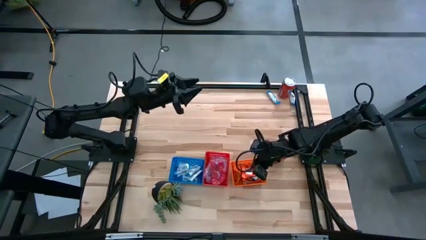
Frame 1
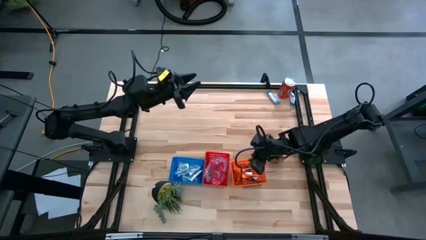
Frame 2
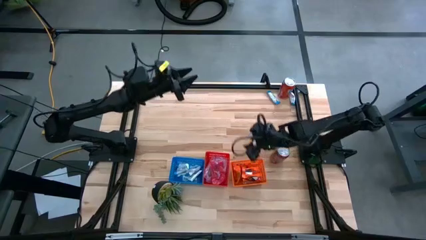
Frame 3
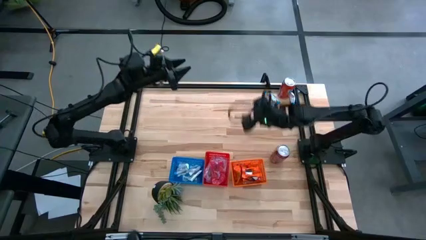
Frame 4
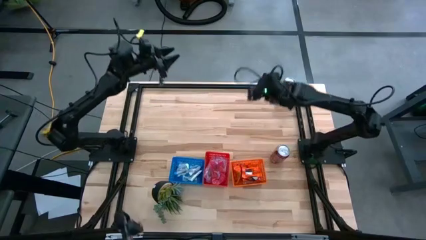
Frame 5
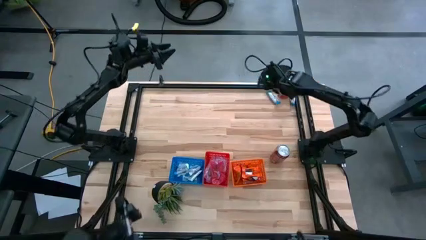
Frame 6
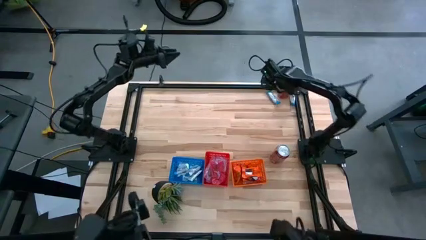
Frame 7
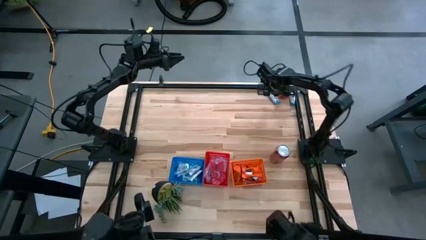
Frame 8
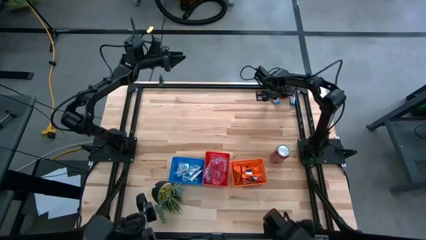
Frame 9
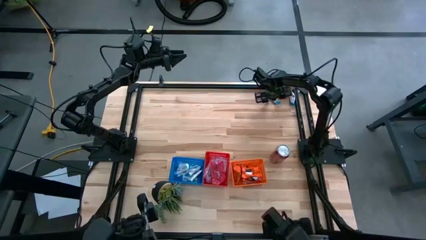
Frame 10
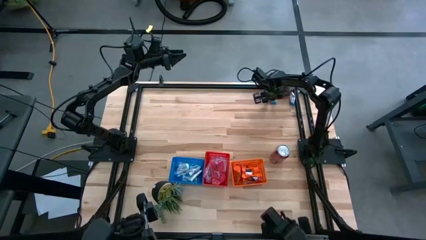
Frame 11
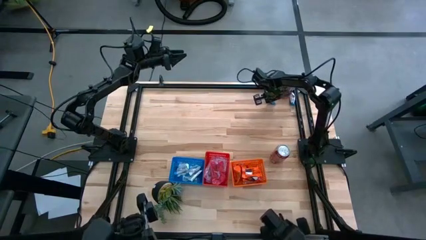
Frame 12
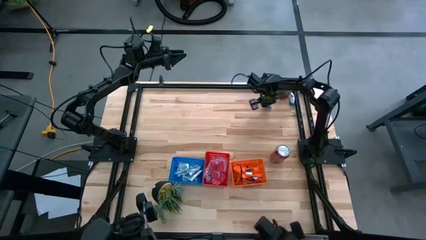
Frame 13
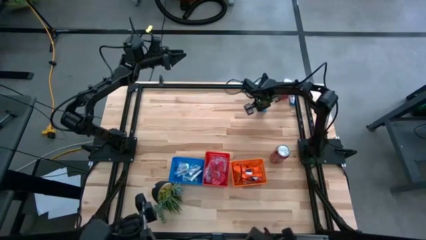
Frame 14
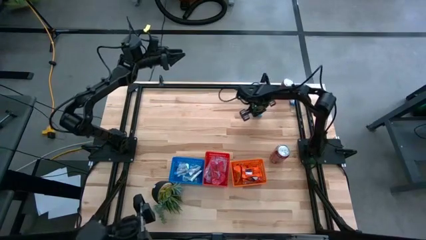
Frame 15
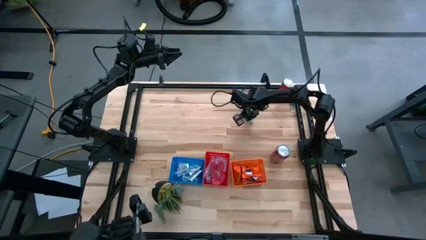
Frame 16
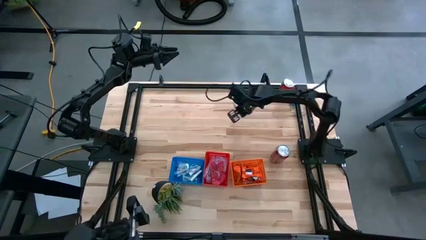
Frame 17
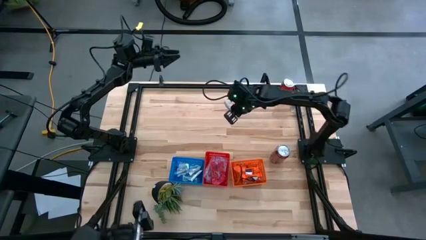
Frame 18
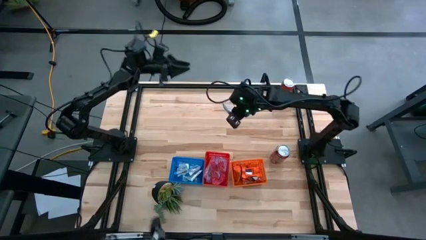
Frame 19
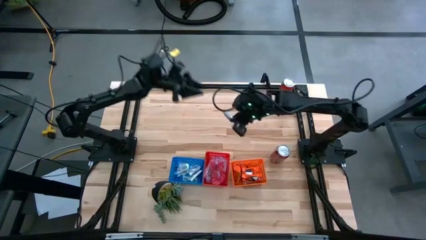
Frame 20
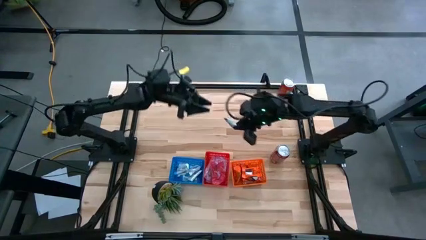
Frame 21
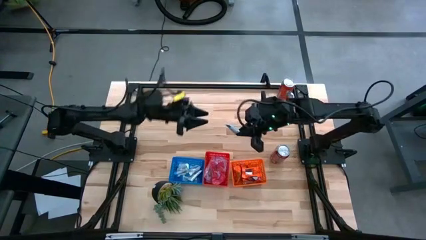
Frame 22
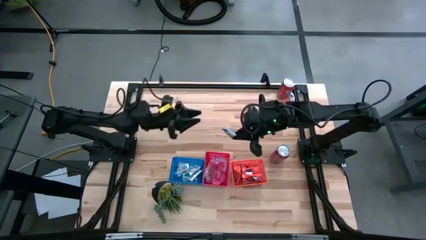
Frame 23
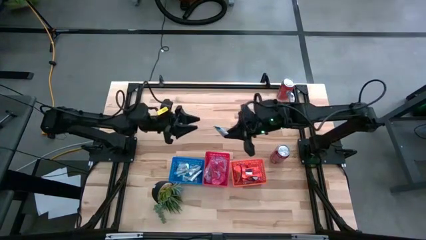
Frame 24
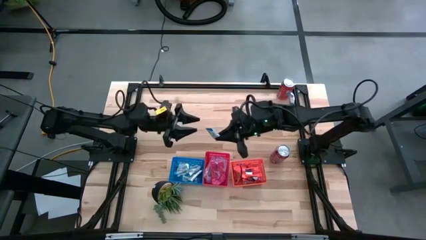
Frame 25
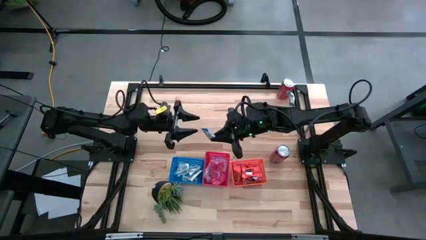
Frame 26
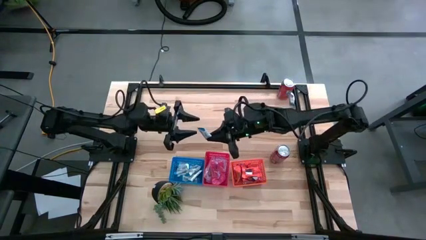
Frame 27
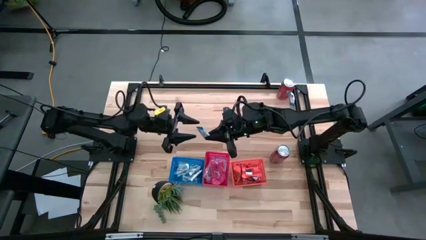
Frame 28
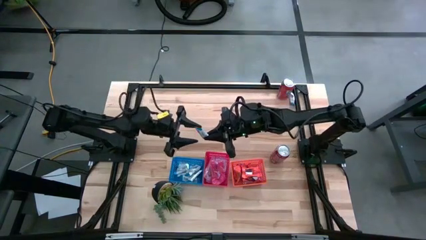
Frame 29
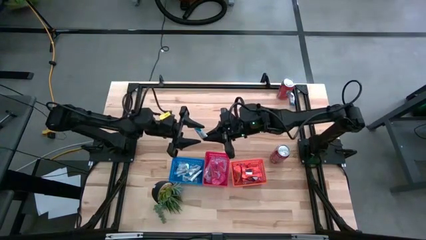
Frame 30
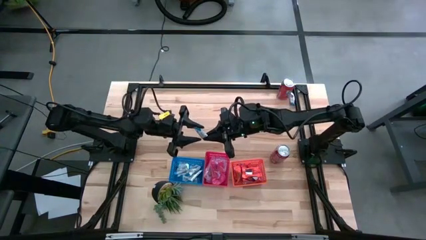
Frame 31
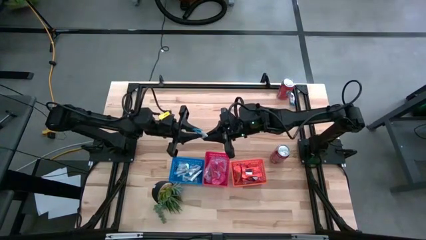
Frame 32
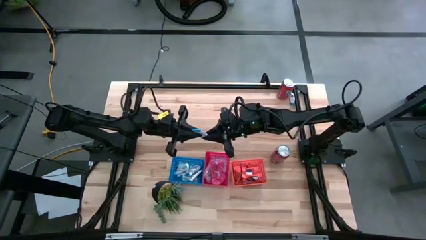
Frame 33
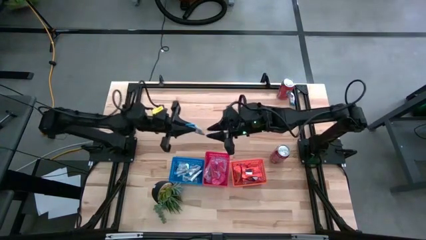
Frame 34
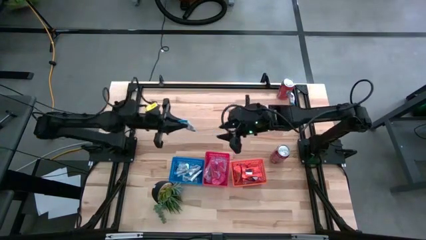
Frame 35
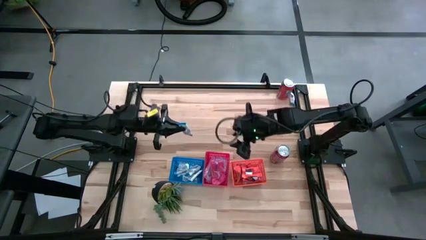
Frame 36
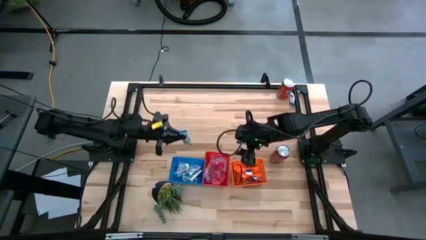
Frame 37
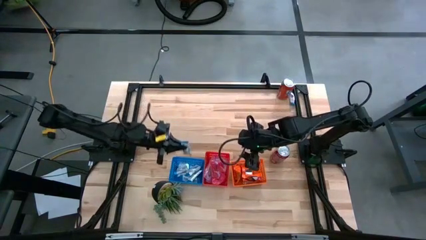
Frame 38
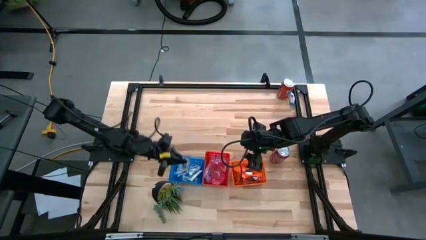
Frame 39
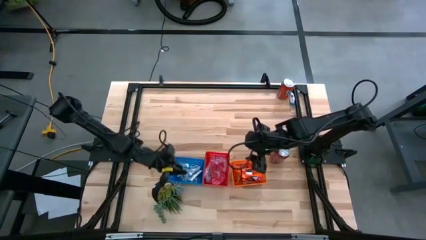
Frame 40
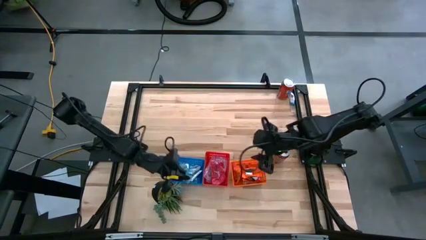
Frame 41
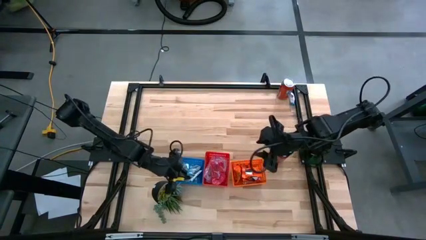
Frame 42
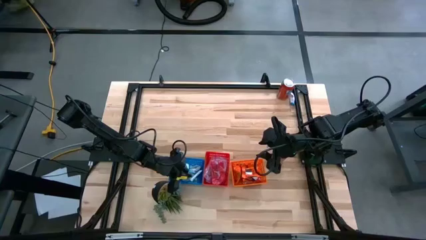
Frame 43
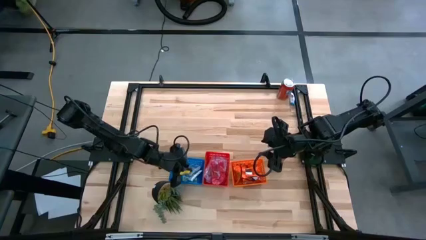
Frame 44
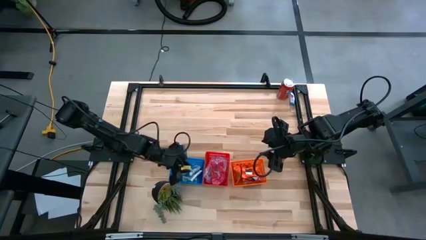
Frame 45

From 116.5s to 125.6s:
Task: Sort candy
Put the white candy pack into the blue bin

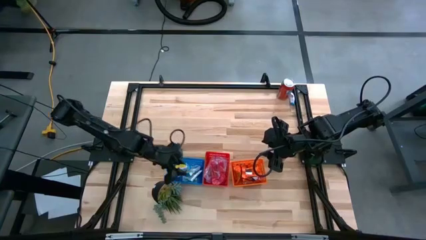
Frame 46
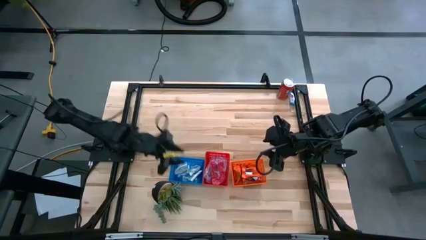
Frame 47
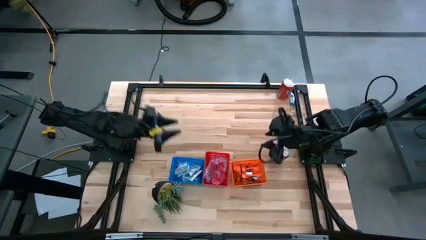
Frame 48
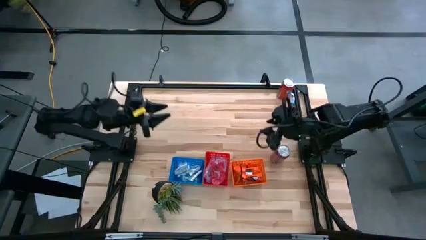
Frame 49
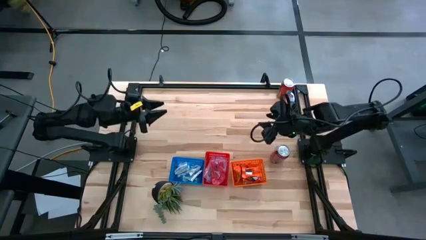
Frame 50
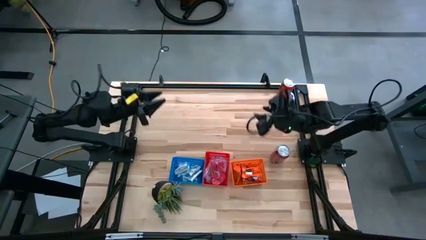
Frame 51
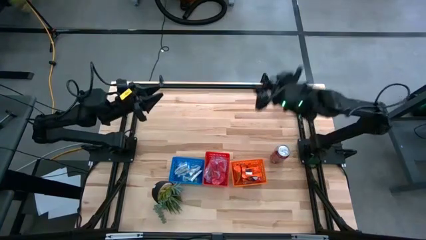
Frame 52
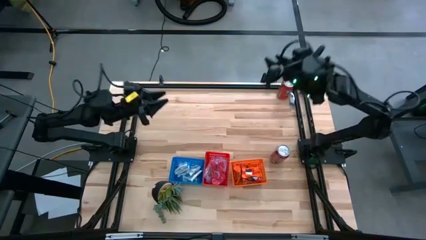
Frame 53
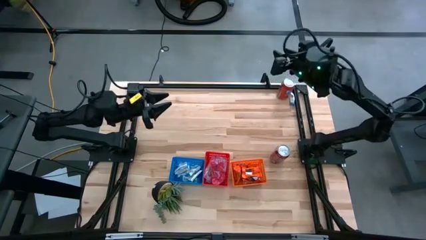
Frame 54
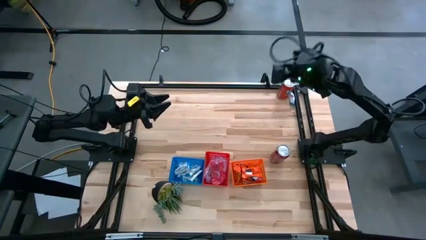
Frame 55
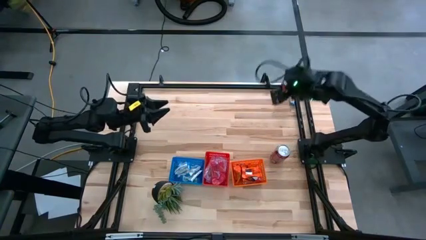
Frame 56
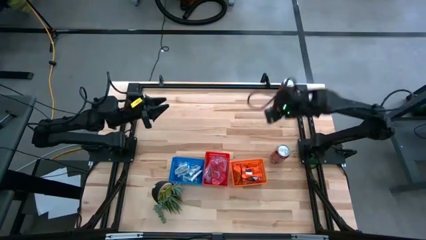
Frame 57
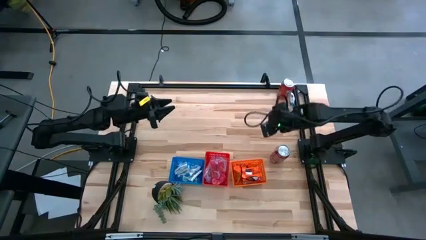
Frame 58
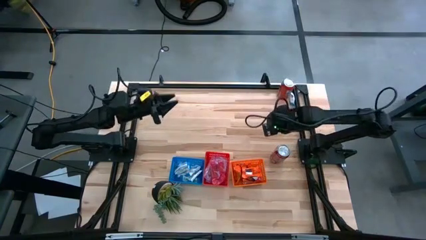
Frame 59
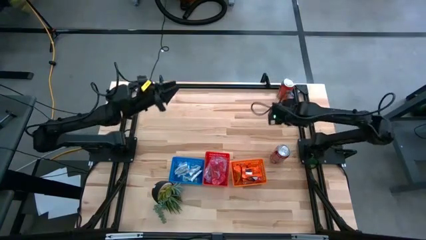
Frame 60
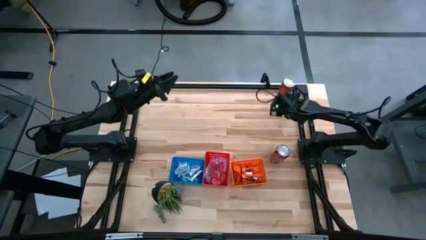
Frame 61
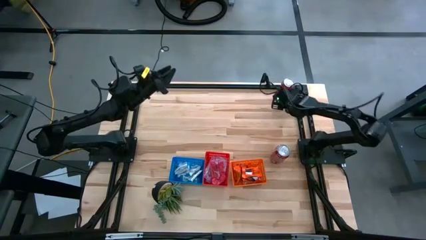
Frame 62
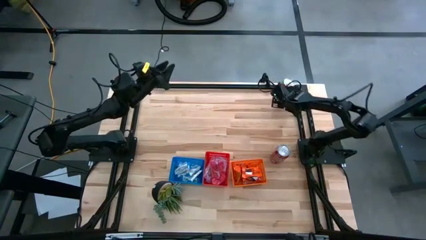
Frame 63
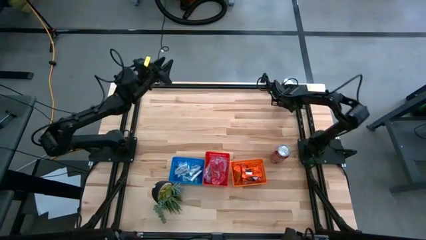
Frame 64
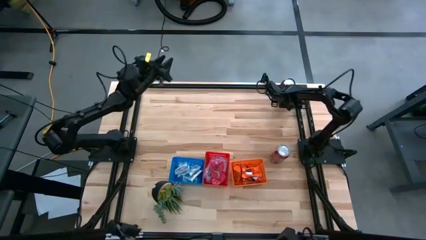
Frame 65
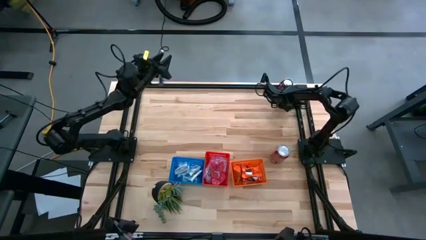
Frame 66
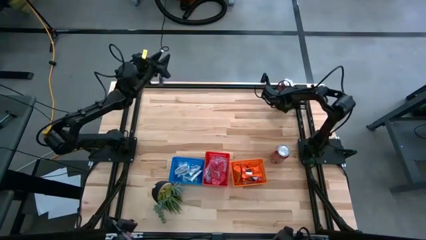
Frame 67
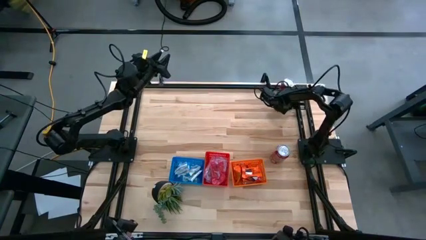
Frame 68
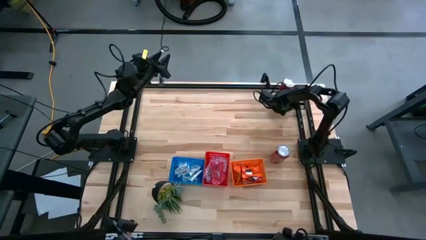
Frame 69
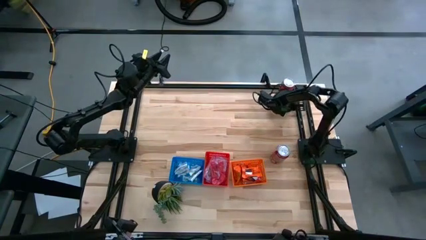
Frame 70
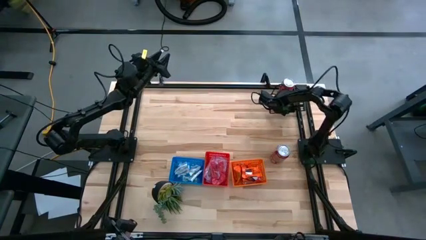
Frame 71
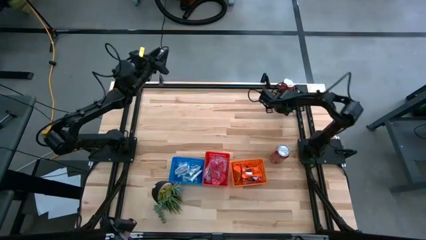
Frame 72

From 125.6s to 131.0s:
Put the white candy pack into the blue bin

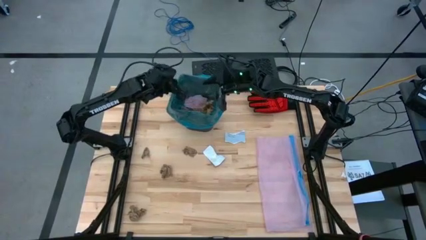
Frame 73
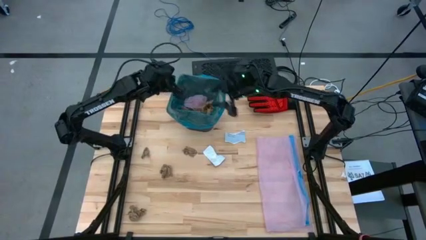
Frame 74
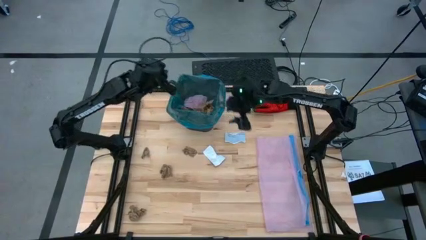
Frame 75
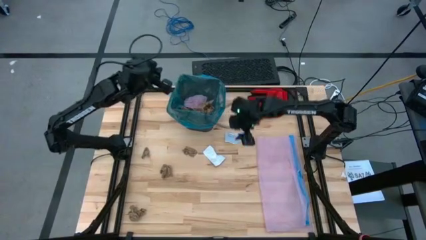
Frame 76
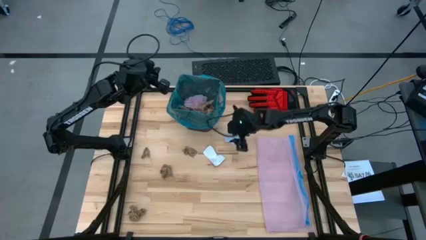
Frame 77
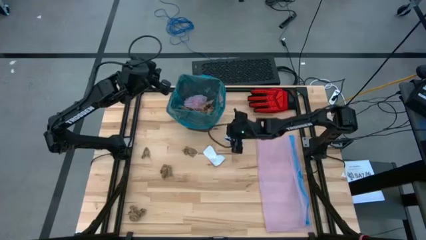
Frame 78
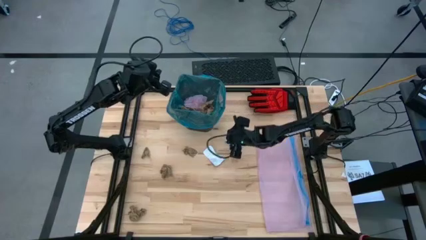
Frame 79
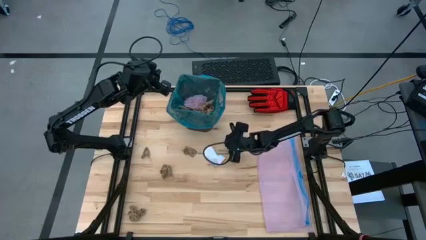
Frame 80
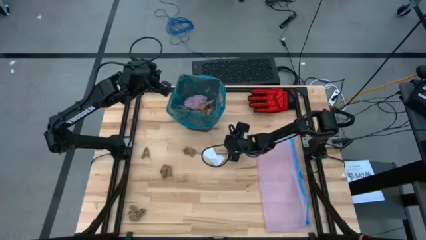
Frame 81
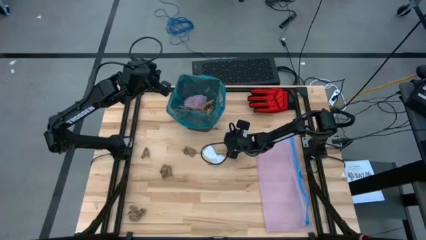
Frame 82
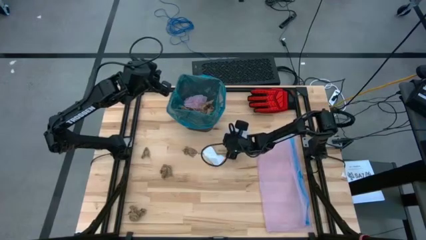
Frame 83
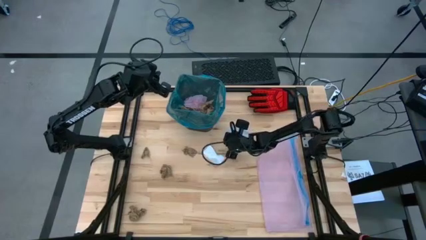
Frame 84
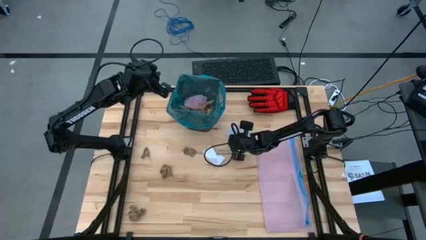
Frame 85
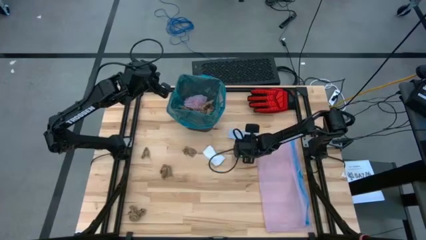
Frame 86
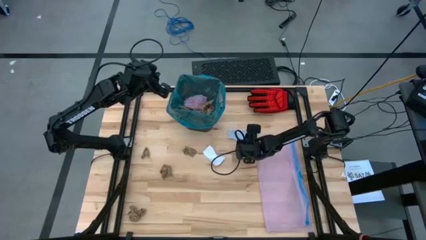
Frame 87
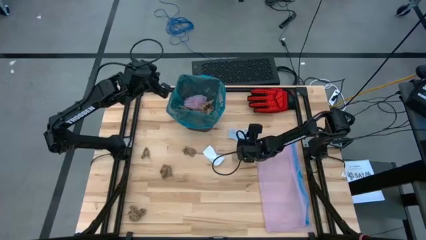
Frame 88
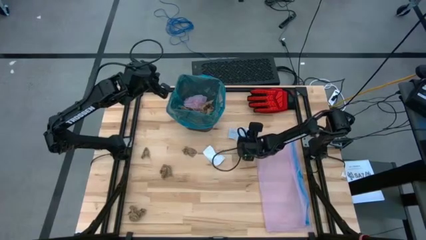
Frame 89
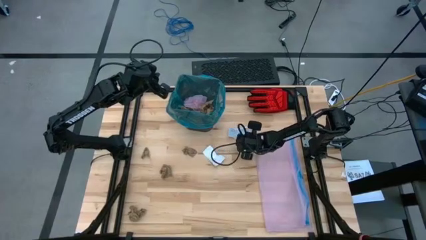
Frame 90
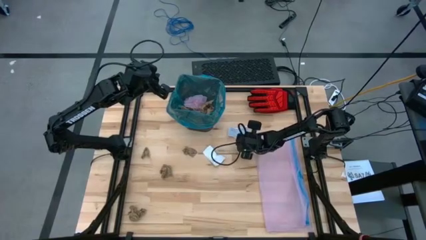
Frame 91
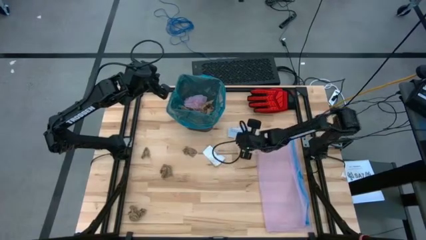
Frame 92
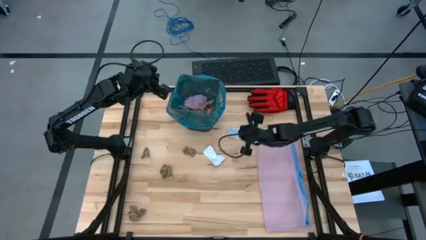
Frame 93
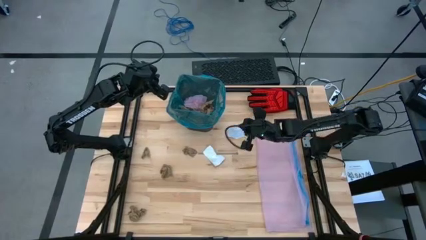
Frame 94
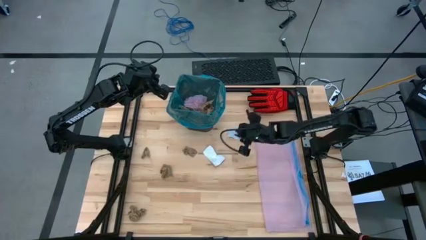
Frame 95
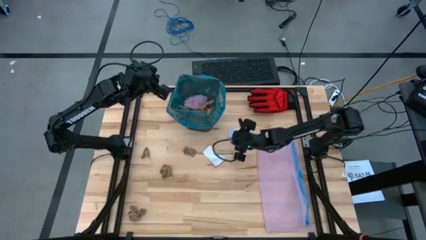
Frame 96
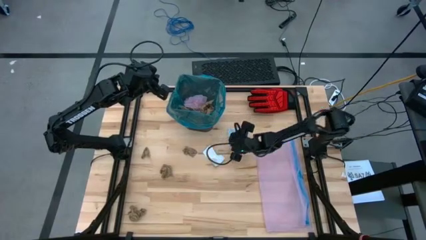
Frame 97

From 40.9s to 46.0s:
Task: place trash/remove bag and relplace
Put the blue paper into the trash bin
